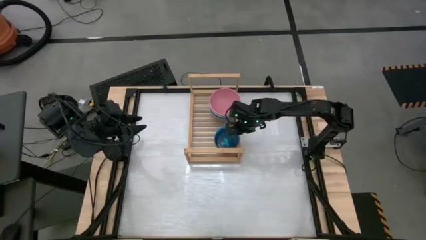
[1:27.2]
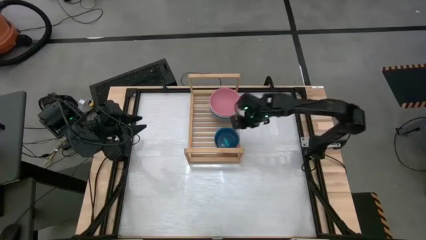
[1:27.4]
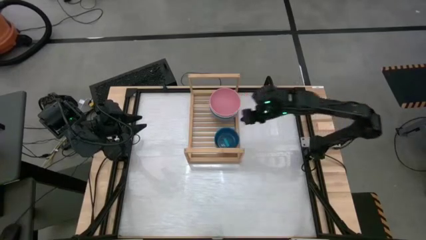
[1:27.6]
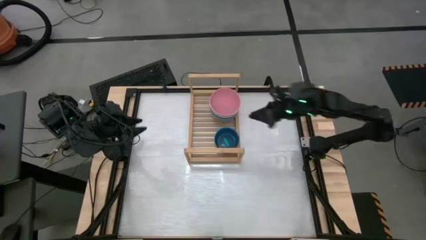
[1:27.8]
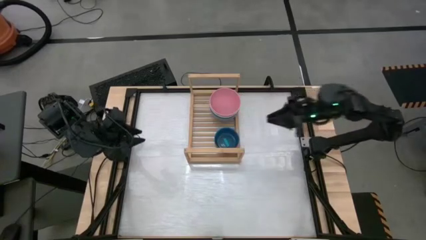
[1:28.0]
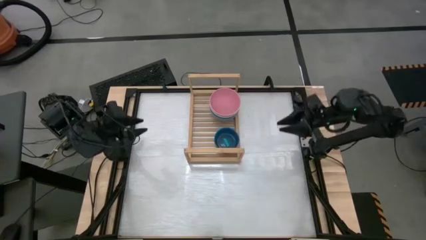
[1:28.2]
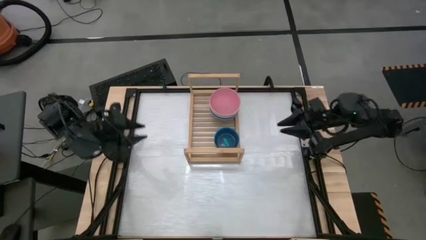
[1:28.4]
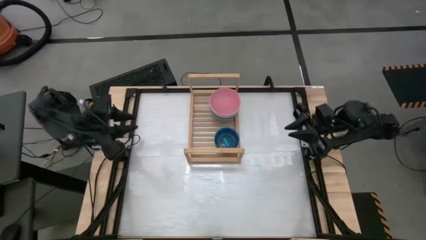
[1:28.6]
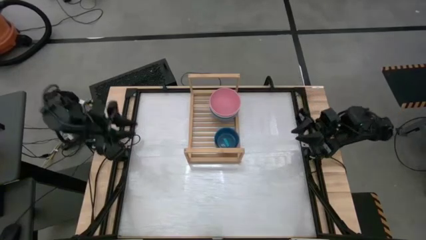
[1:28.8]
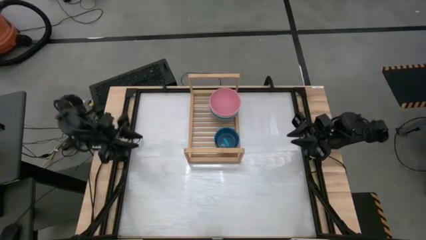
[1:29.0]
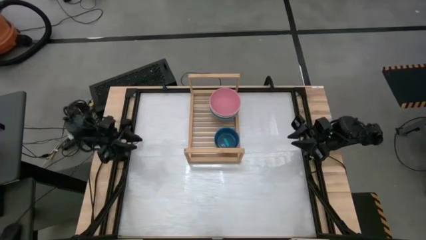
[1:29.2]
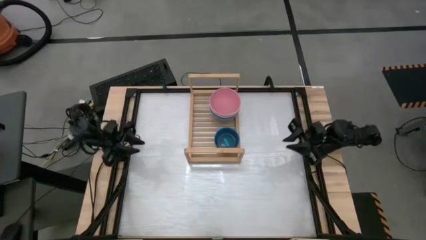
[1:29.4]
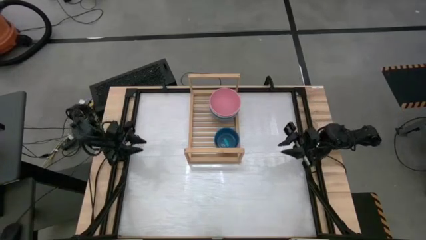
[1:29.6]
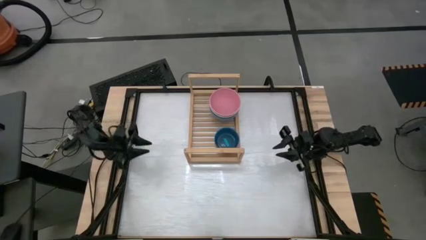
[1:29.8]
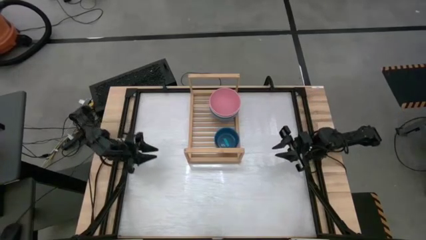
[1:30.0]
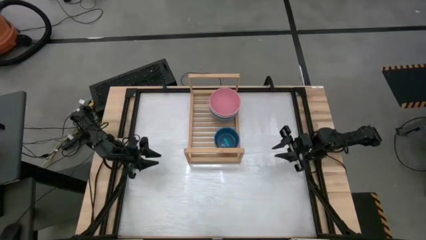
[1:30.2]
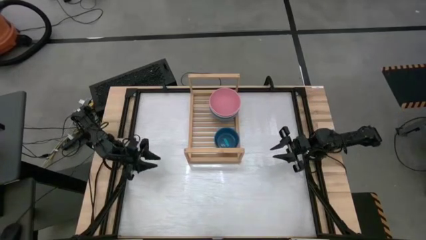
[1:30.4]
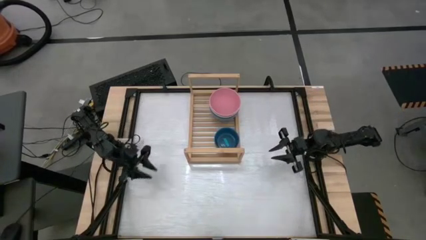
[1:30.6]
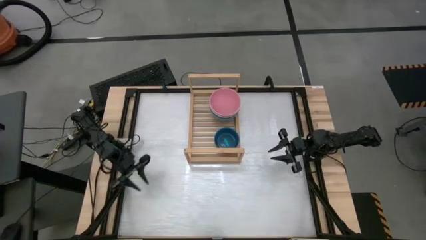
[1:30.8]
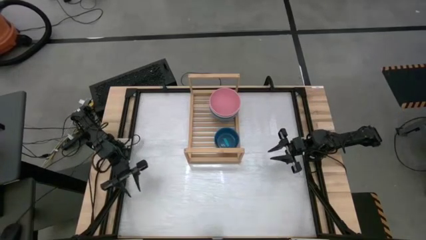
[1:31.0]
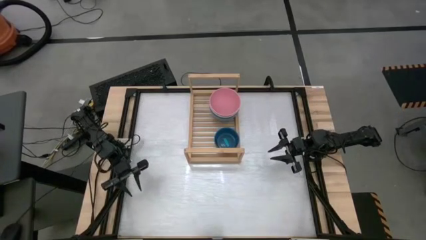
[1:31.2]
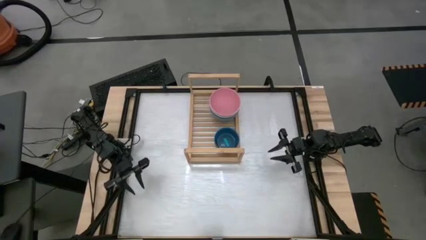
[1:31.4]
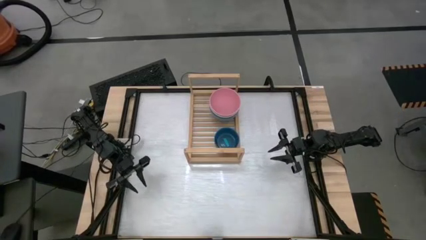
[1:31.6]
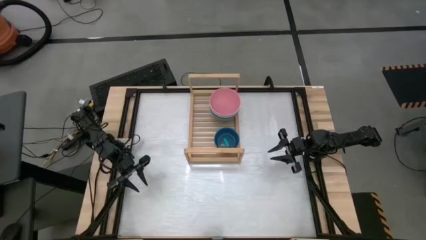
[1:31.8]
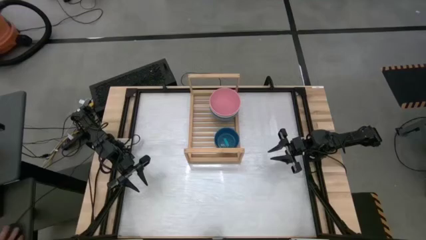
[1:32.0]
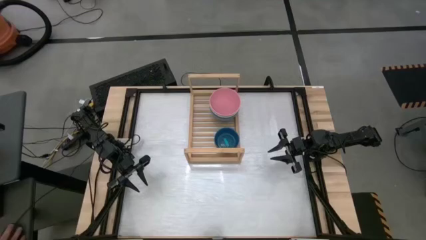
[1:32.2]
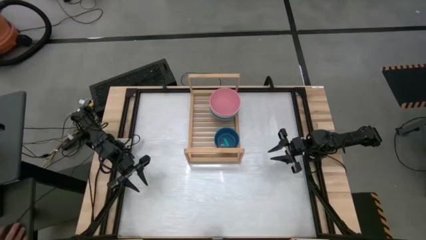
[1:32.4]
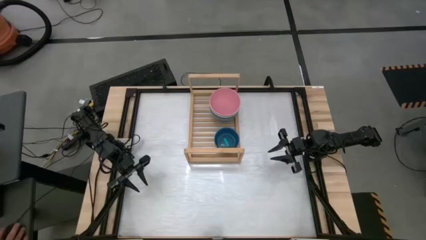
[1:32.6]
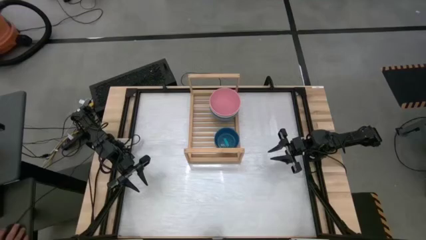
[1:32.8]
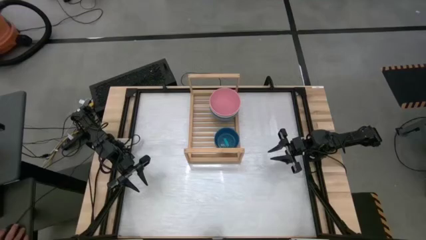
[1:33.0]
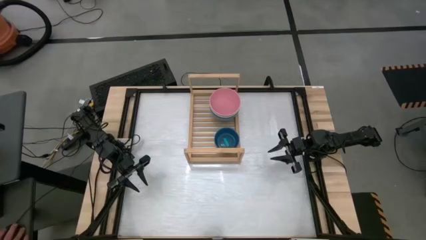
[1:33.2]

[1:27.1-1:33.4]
Task: Place and stack bowls onto a shelf
Return to Home Position

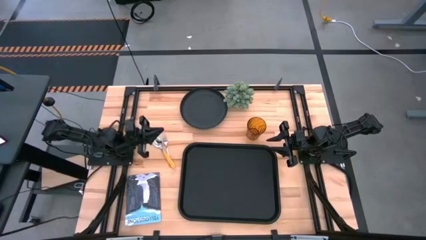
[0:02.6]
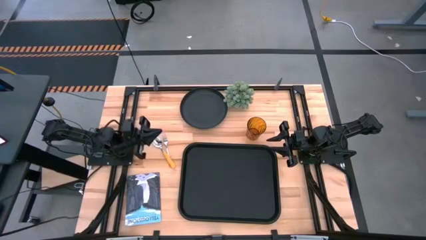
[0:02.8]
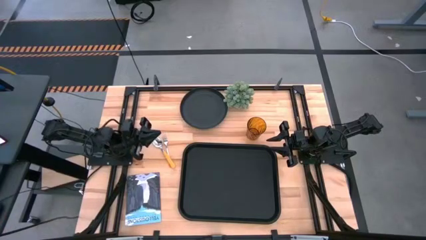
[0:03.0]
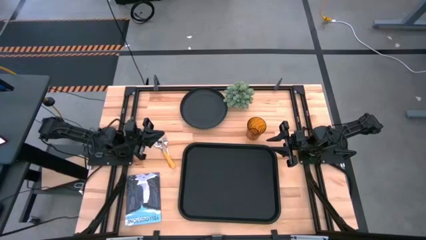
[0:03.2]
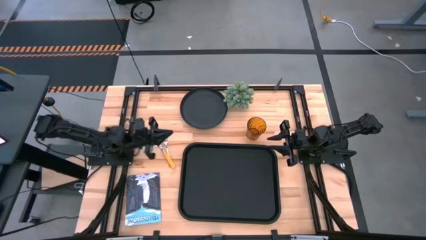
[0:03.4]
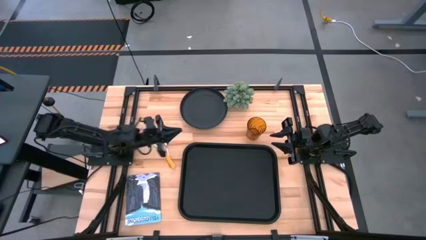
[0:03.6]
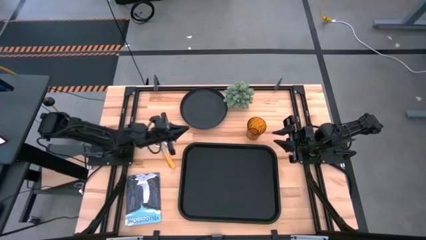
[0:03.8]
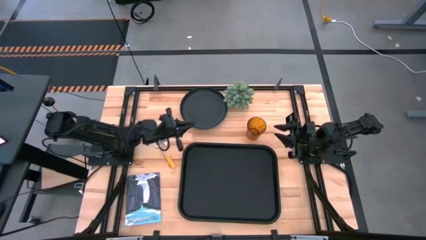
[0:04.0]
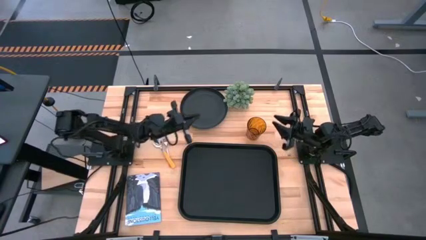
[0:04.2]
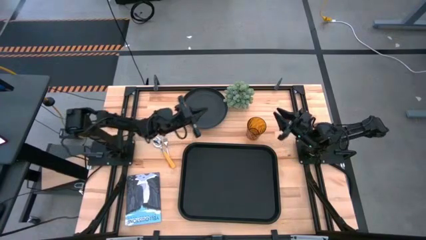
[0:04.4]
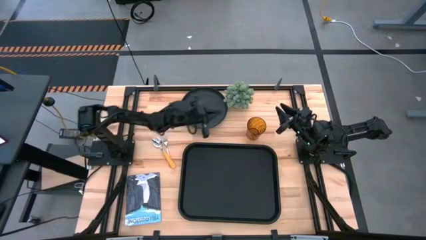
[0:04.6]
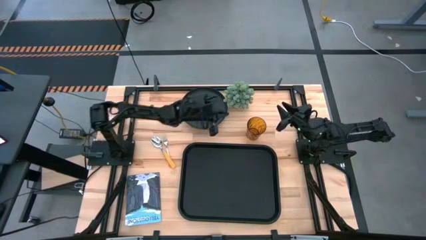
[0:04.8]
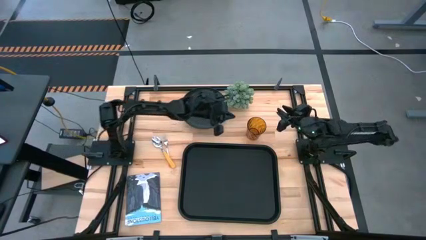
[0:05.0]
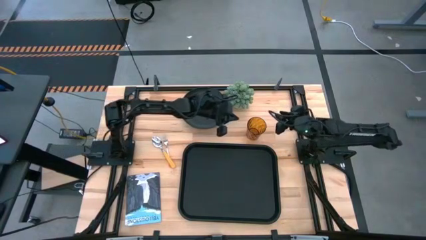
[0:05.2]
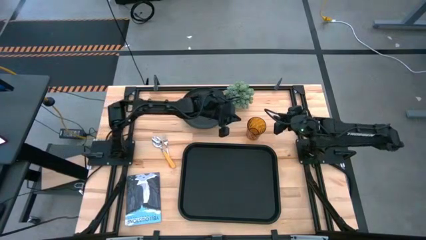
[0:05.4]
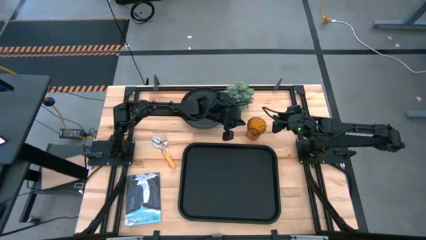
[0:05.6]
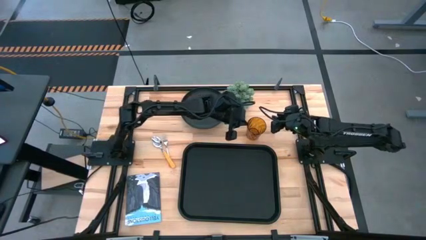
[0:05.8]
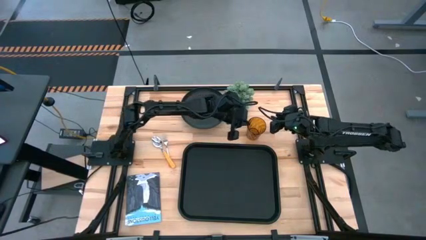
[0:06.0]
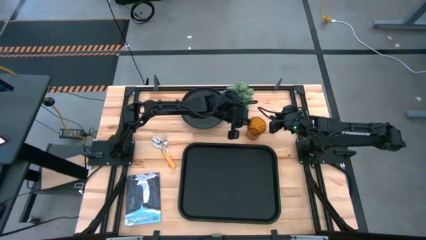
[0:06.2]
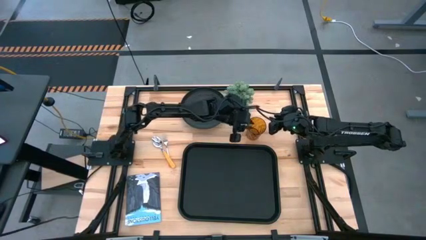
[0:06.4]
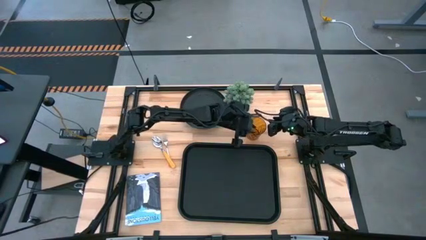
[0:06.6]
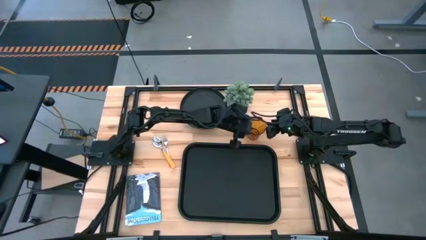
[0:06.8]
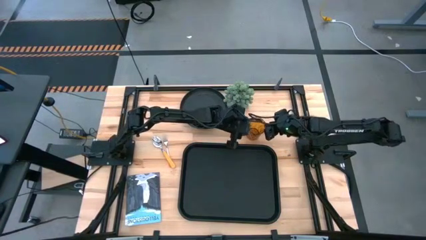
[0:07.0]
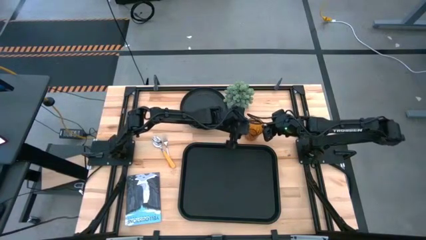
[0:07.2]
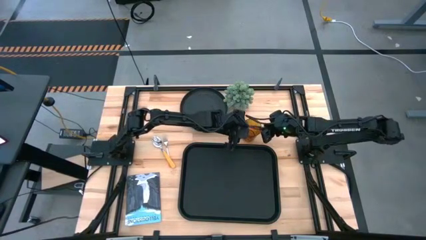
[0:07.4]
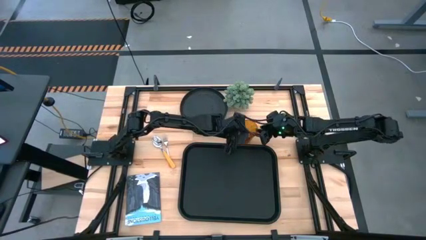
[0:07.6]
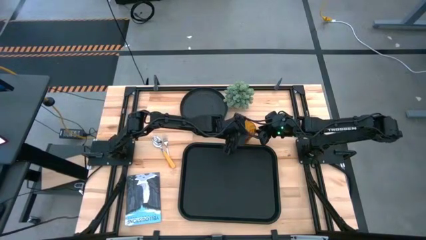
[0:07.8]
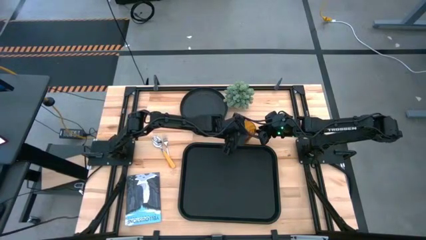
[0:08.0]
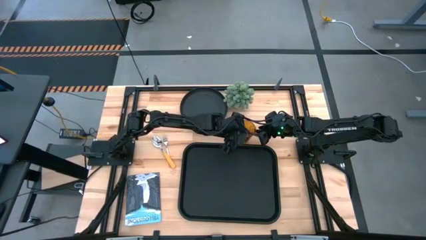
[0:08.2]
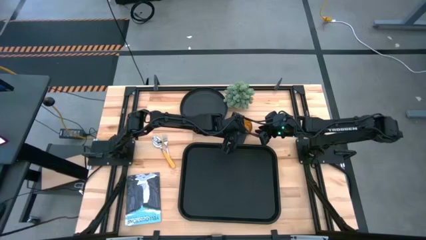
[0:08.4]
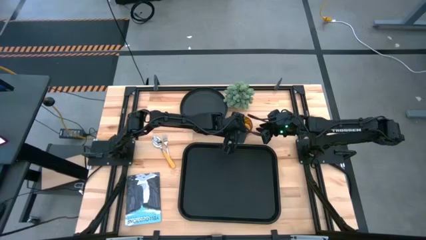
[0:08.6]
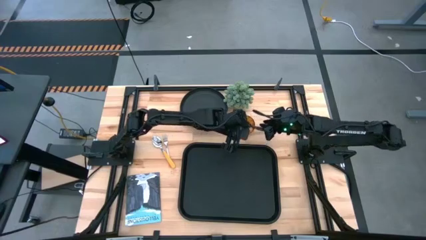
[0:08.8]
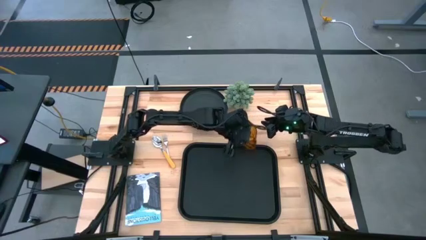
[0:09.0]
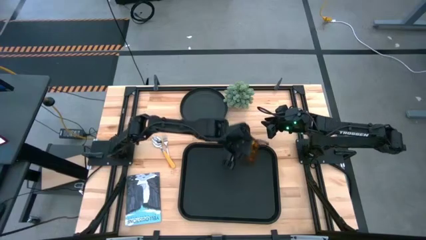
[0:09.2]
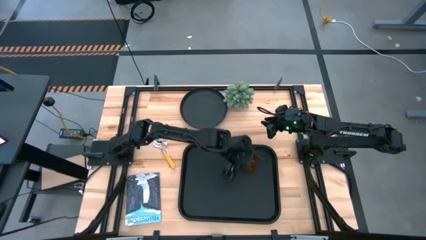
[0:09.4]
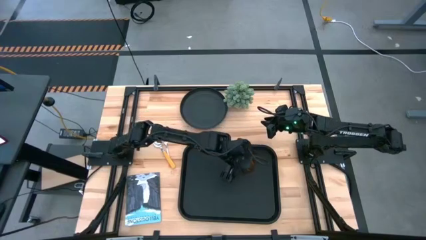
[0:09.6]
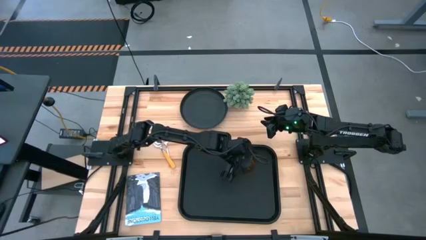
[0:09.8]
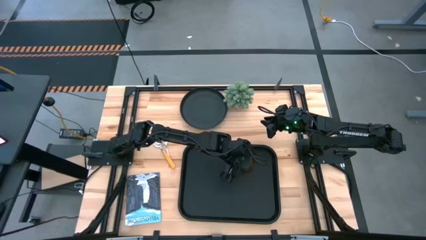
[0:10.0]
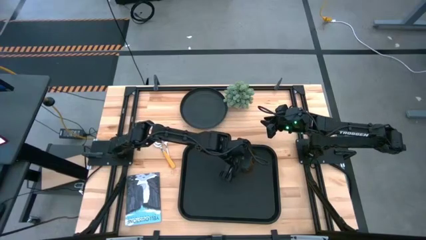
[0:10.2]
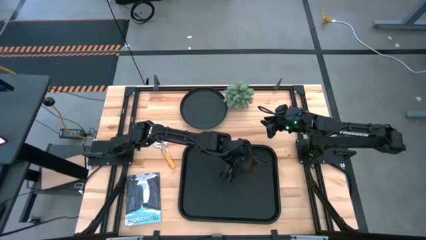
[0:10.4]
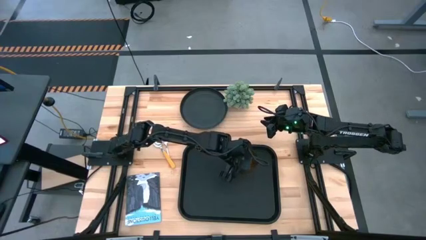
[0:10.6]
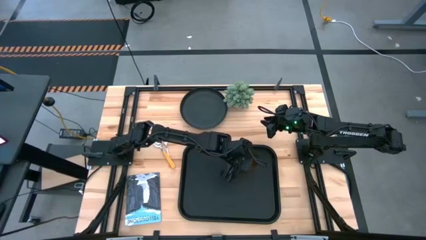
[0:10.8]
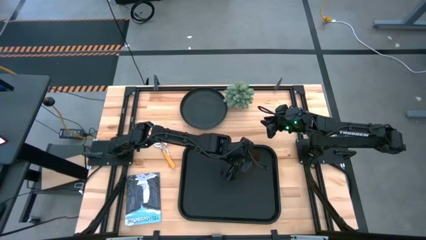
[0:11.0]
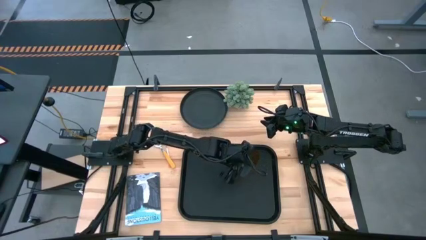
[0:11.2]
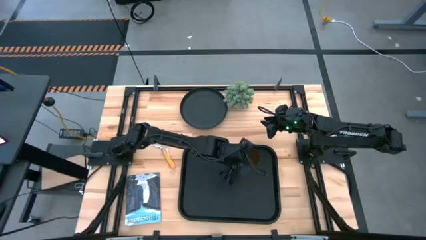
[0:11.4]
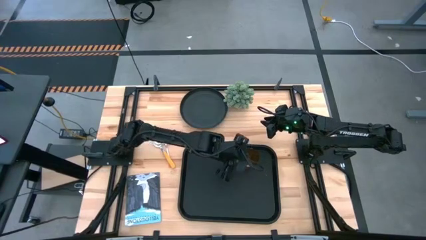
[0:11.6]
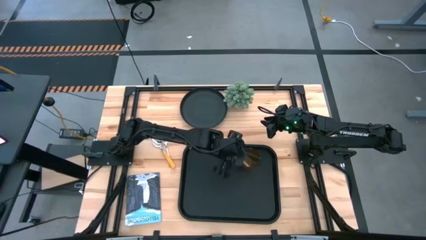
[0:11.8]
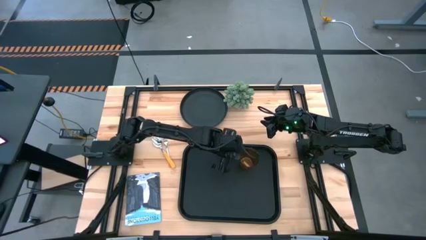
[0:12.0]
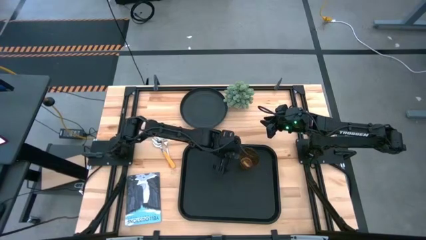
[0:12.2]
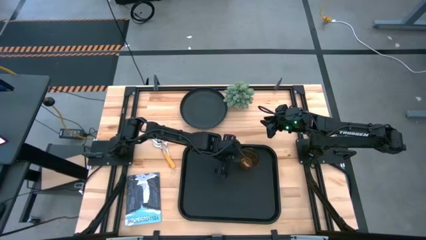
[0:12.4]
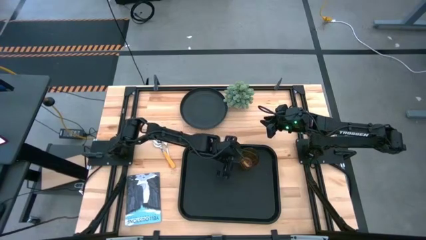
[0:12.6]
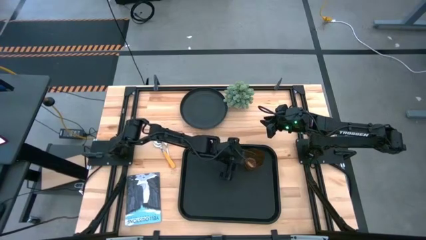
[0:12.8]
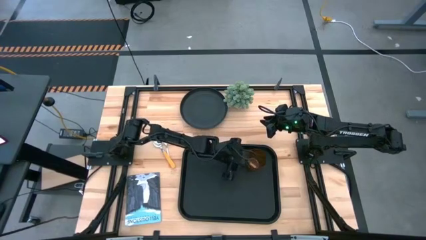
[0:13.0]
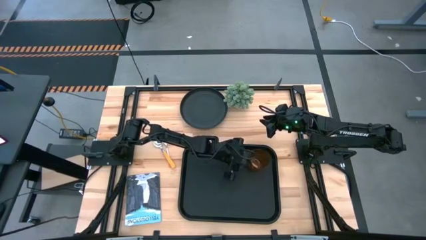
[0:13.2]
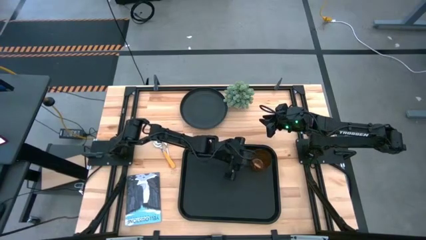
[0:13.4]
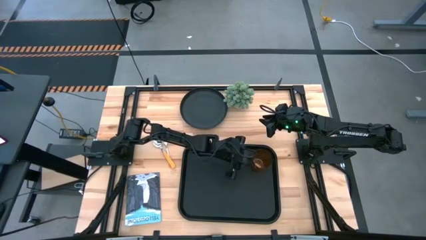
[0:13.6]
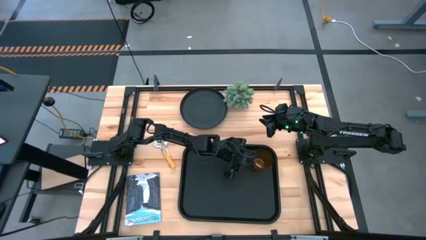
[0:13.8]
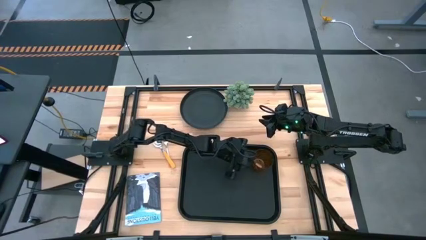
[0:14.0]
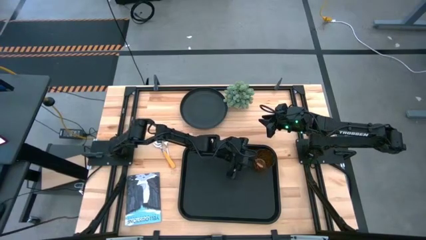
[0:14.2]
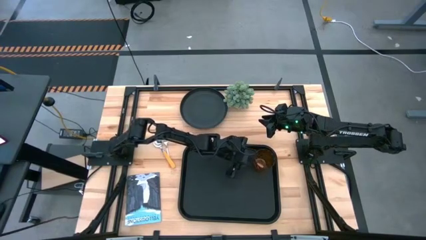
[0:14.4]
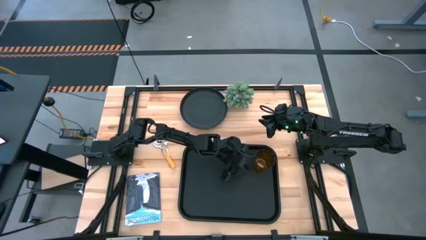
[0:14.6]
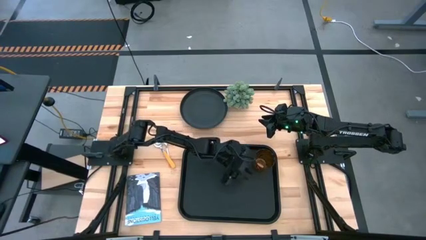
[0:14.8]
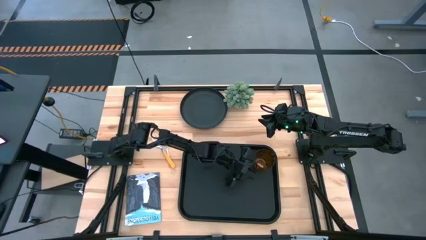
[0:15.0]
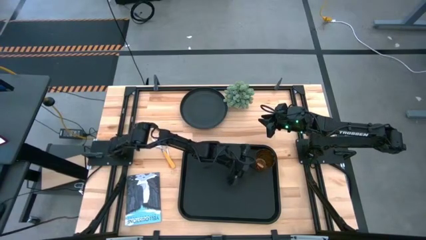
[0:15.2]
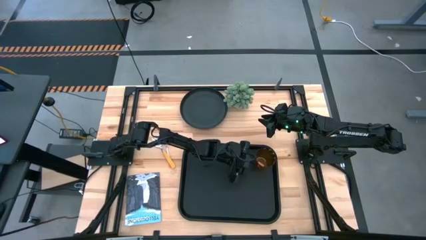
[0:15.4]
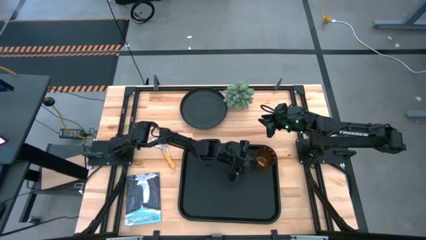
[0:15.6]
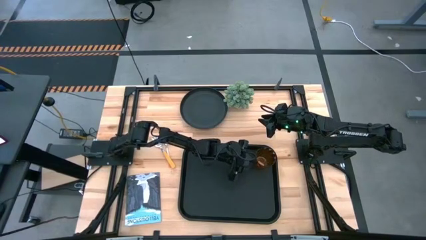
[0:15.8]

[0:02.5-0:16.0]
Task: Pick and place plate/cup/fork/spoon on tray
Put the gold orange cup on the black tray
